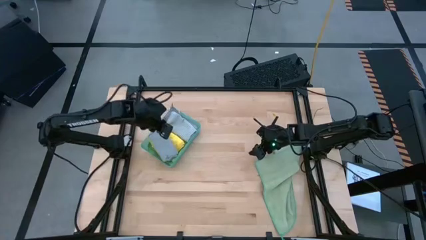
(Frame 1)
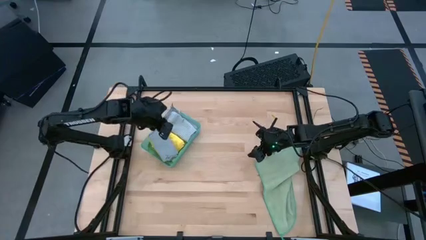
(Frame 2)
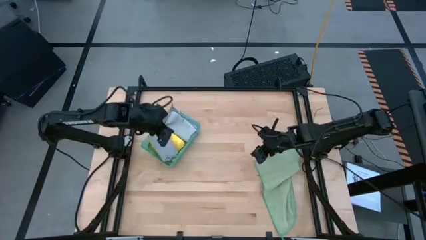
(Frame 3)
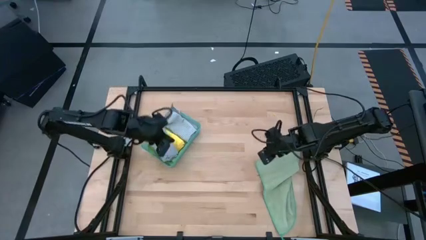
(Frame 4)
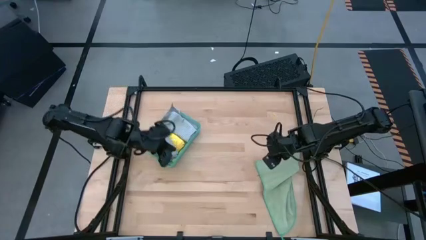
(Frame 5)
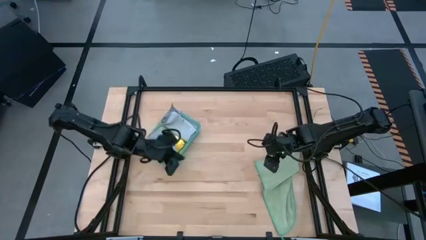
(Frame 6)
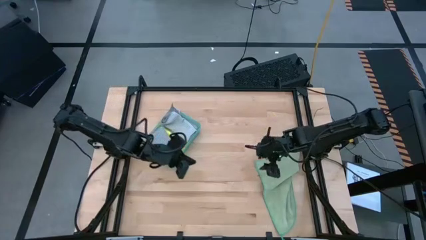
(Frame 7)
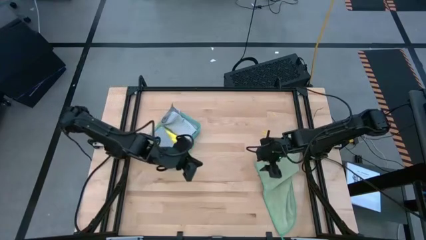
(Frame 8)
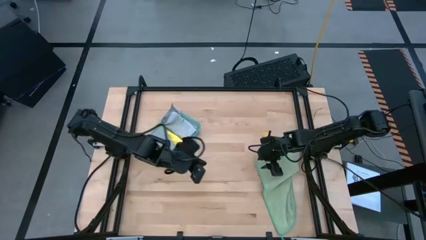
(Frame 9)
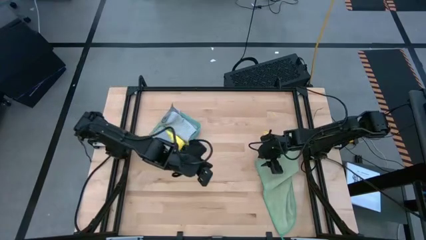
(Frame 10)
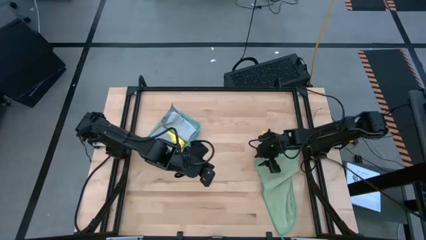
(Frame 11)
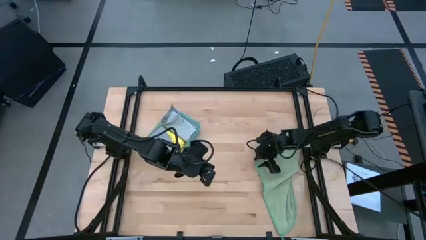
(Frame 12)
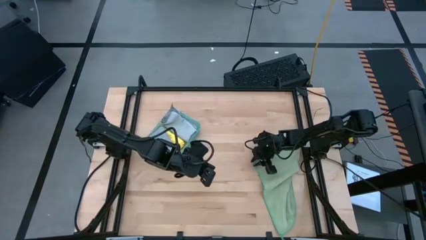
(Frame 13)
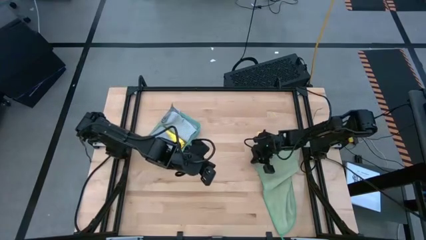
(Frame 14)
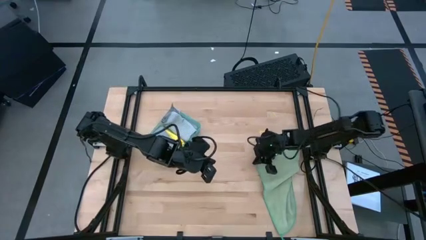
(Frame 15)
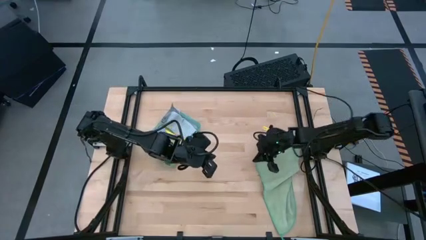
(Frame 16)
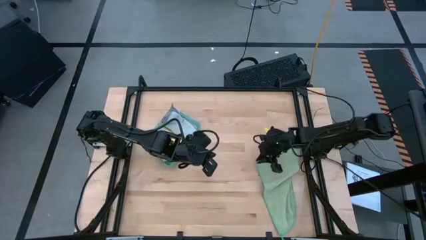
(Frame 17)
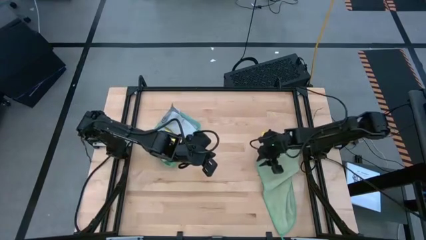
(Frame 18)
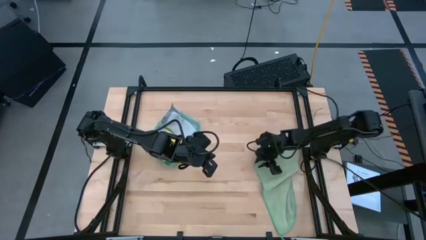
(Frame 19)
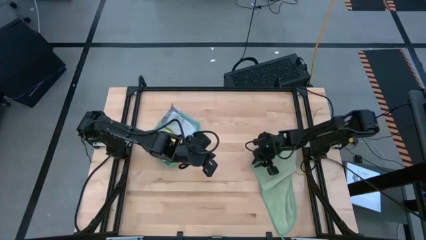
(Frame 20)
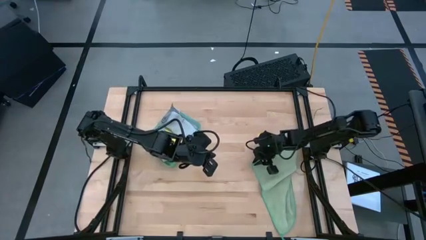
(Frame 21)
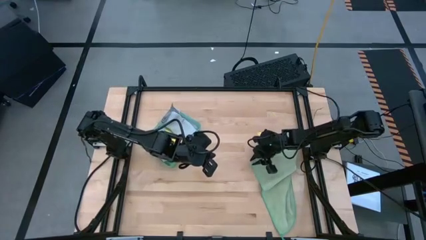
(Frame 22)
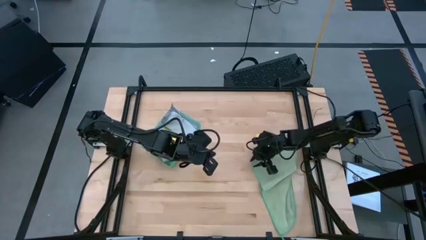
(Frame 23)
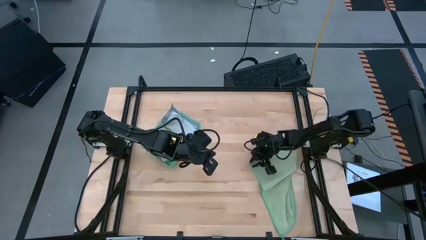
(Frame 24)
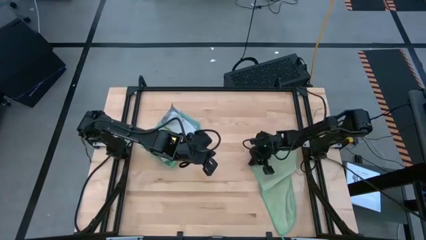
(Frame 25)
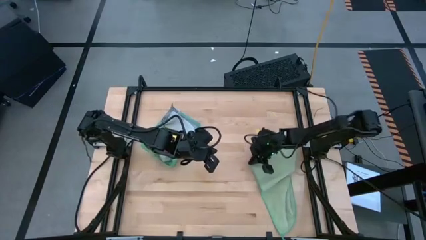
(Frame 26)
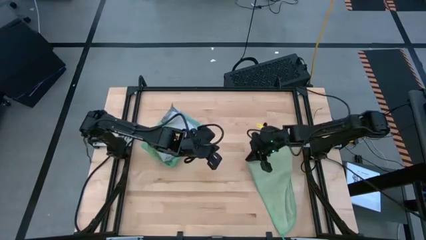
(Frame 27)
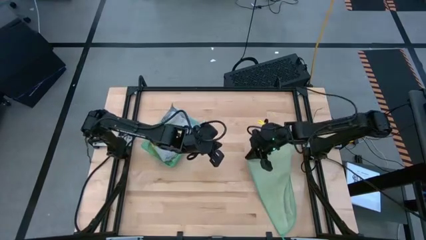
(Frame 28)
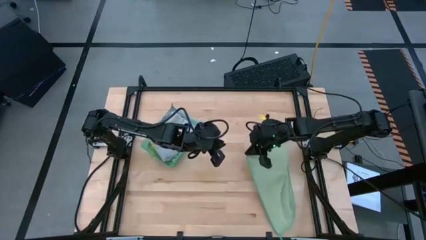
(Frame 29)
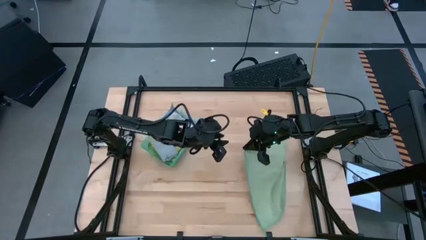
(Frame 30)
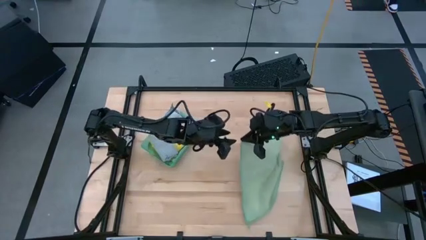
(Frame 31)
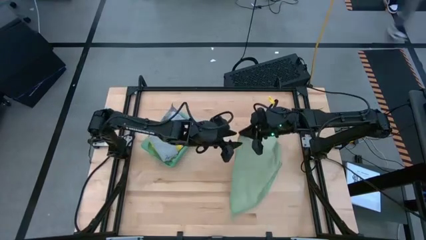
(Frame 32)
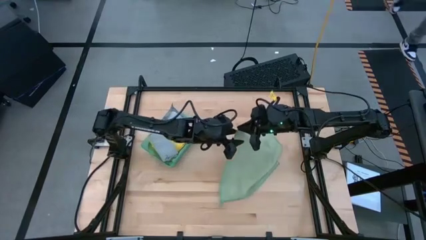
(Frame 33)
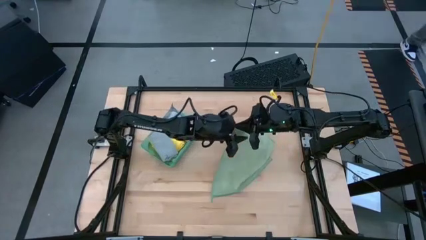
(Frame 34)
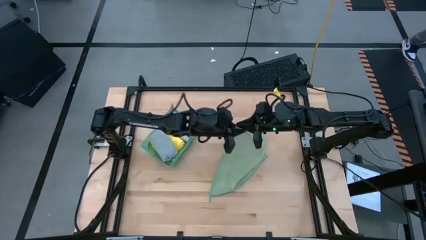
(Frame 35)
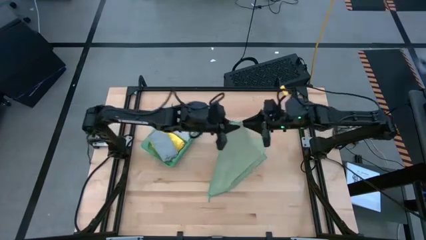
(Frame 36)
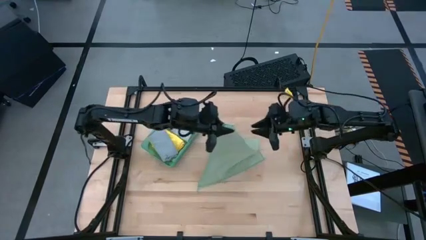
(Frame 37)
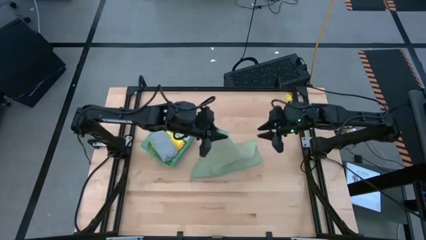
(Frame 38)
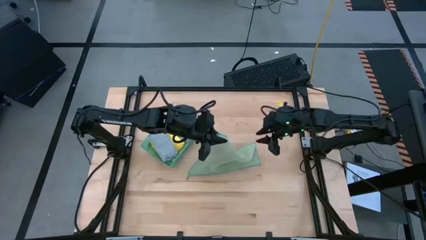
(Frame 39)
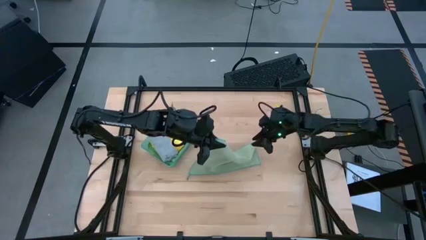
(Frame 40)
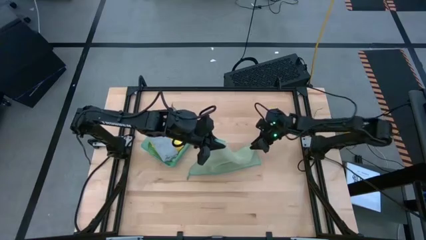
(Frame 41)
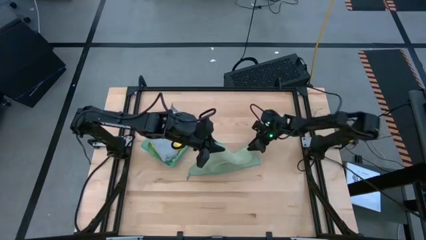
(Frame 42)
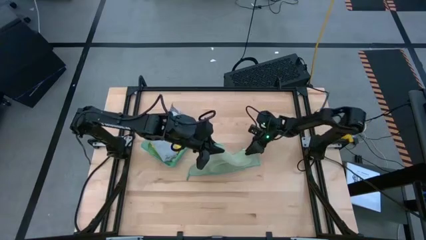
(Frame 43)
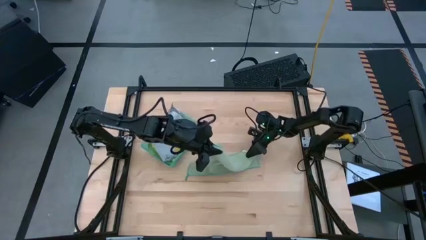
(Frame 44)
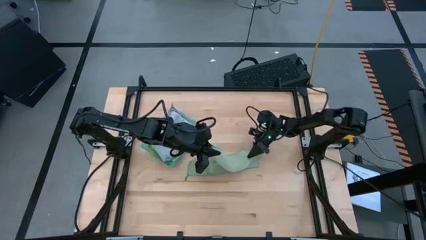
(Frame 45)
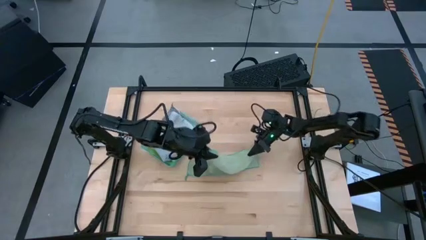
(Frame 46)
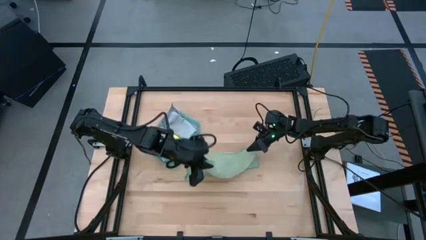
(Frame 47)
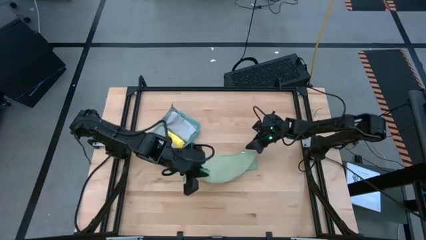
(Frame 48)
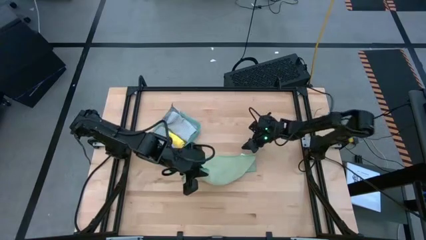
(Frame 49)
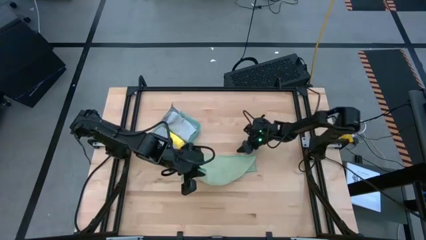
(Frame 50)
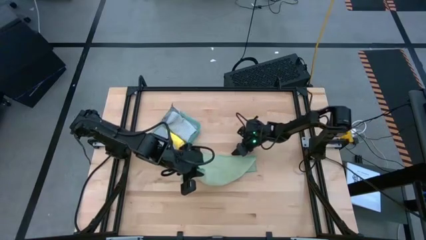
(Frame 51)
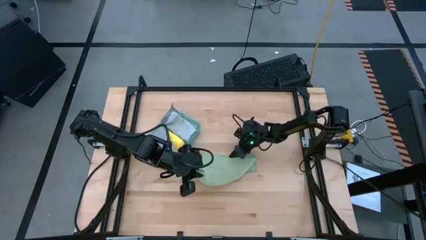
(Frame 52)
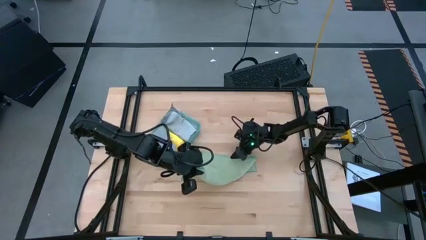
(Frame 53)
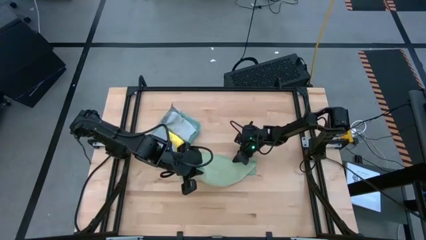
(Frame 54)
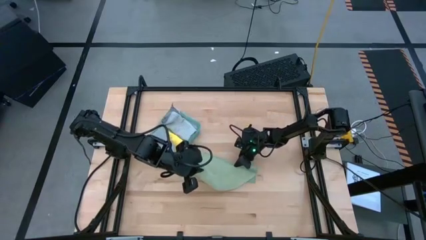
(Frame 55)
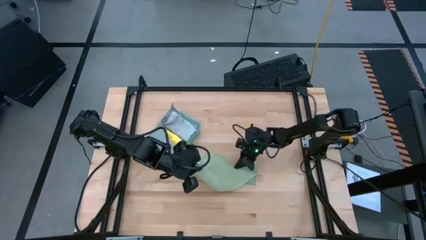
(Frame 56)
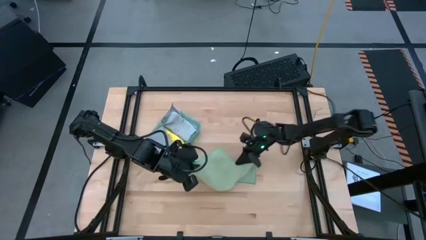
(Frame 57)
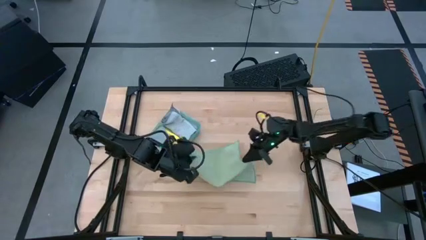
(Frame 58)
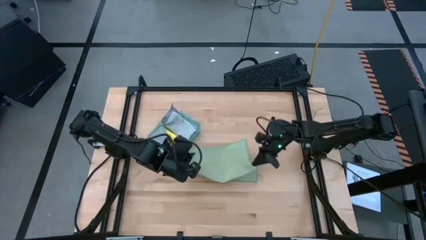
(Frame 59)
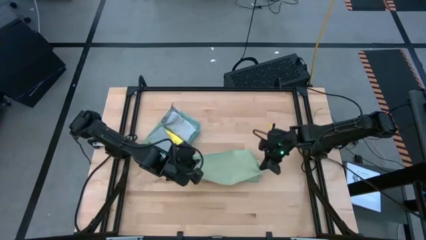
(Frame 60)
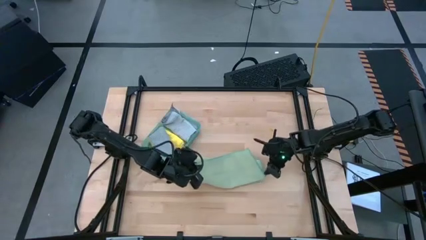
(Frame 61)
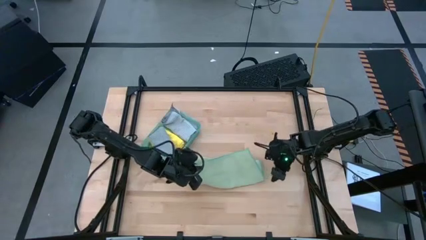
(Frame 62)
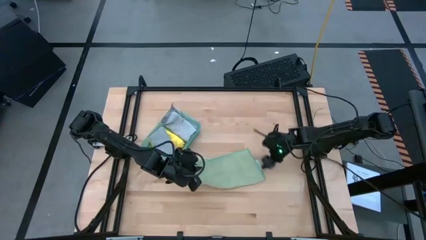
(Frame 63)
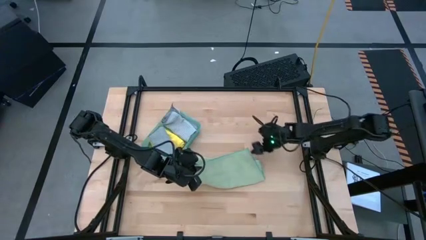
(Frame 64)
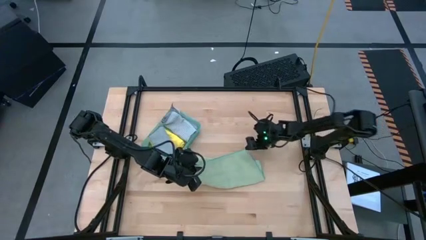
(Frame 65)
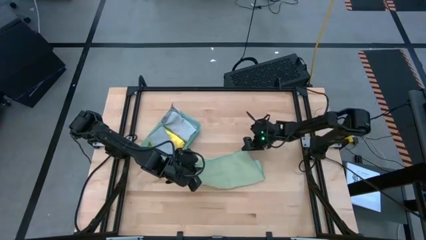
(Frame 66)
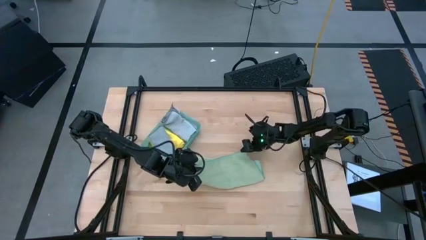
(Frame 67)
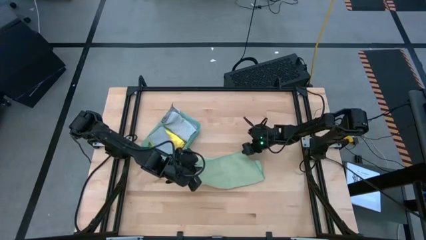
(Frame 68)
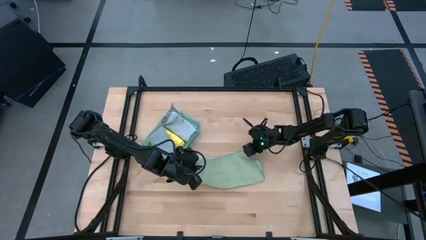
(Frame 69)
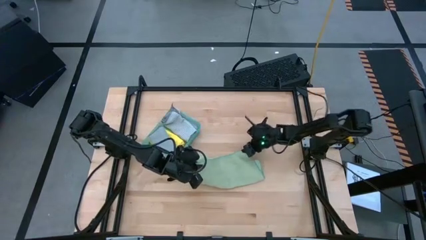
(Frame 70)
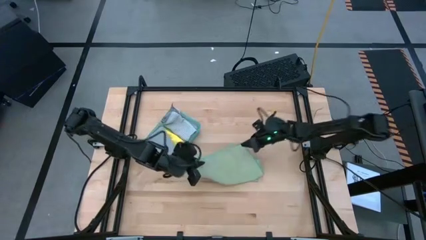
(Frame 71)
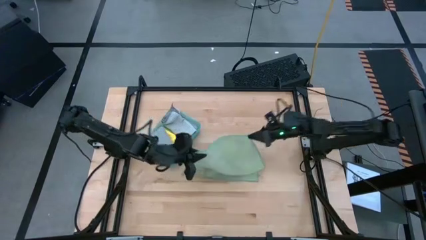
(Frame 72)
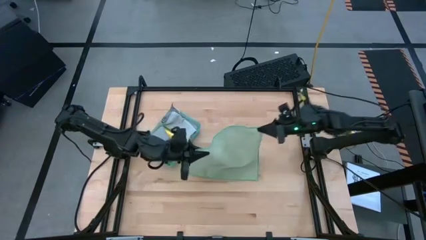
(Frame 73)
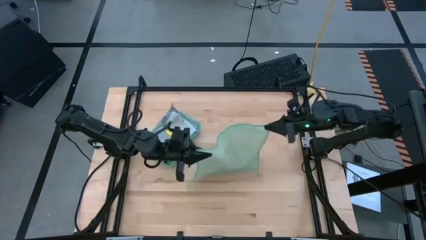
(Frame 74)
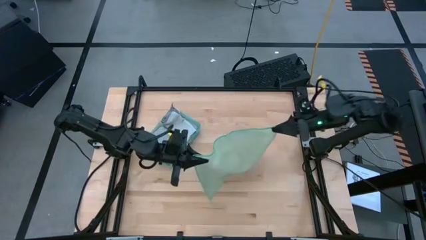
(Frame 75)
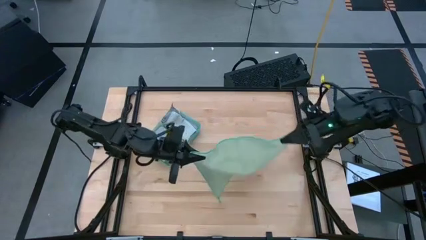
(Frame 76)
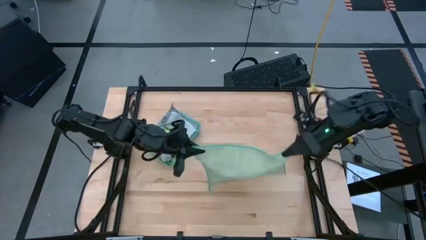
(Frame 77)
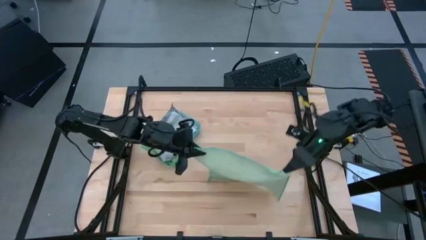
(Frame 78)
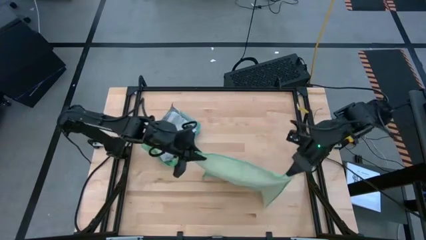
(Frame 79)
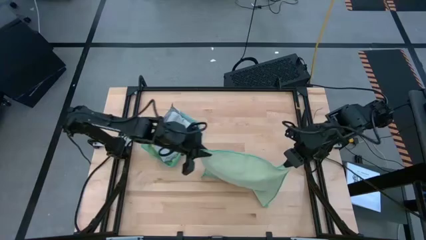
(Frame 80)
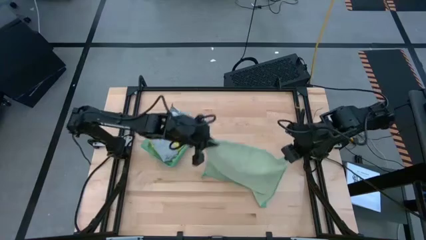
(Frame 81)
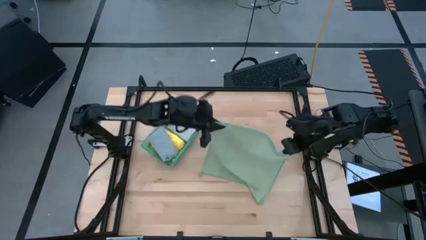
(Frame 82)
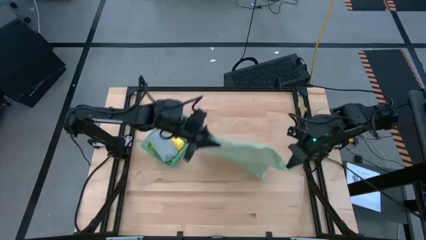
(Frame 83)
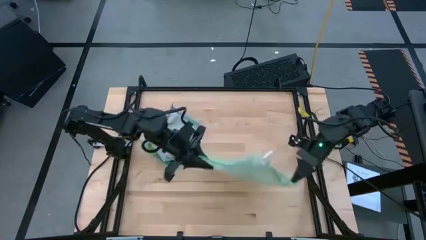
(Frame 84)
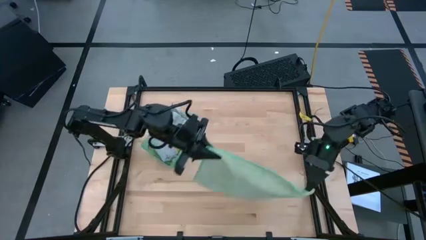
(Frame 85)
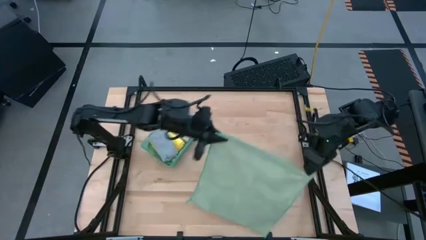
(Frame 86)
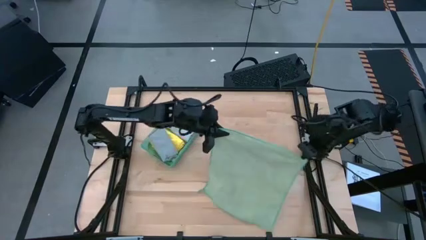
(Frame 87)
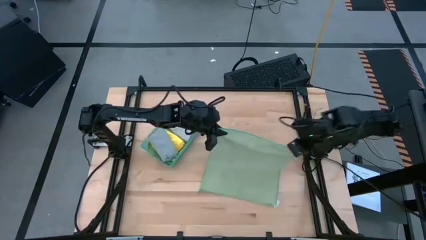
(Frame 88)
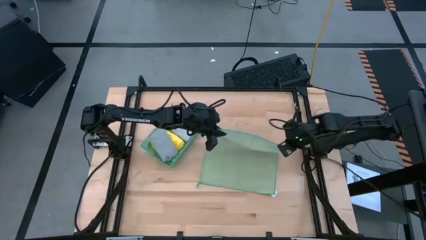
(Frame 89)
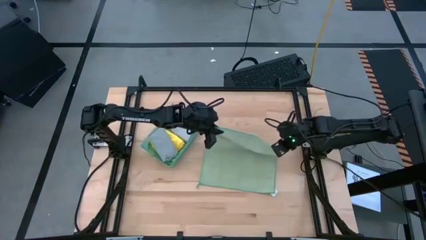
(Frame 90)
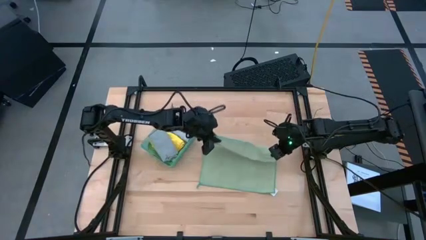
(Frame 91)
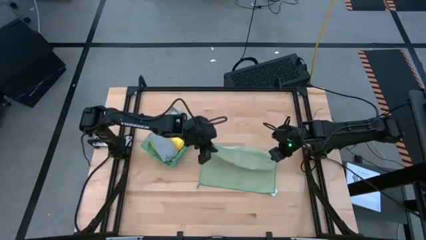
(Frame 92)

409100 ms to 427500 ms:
Task: Fold microfiber towels
Fold the light green microfiber cloth
